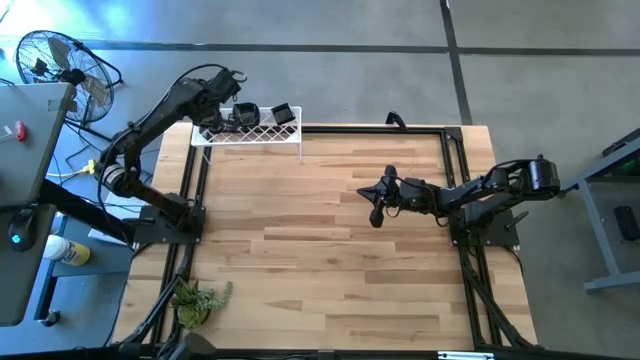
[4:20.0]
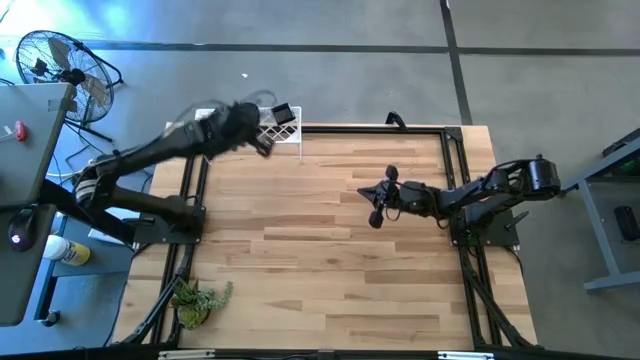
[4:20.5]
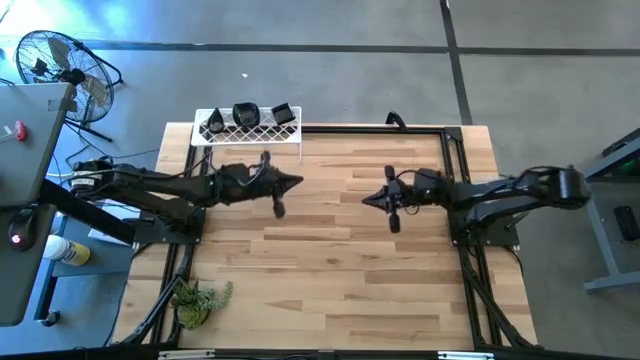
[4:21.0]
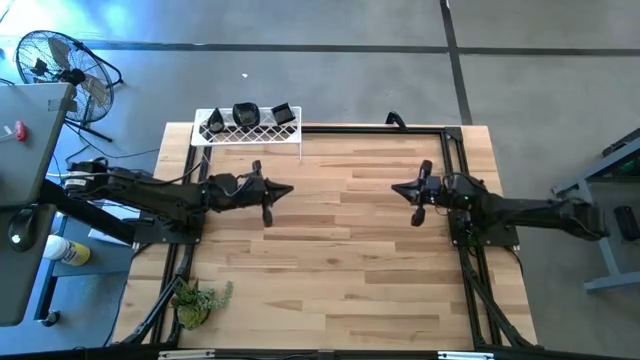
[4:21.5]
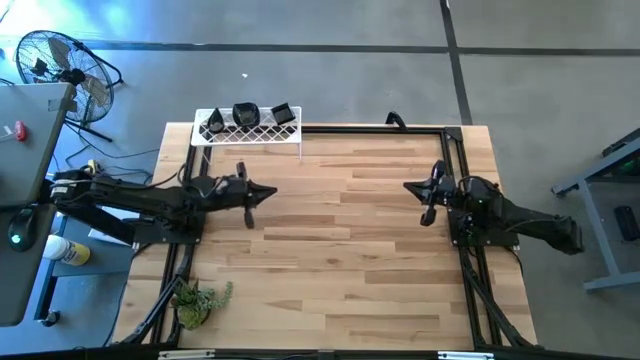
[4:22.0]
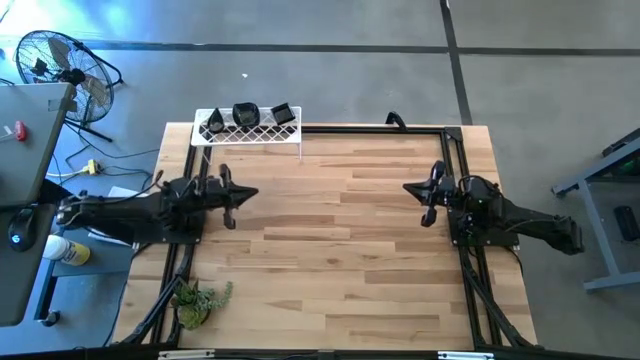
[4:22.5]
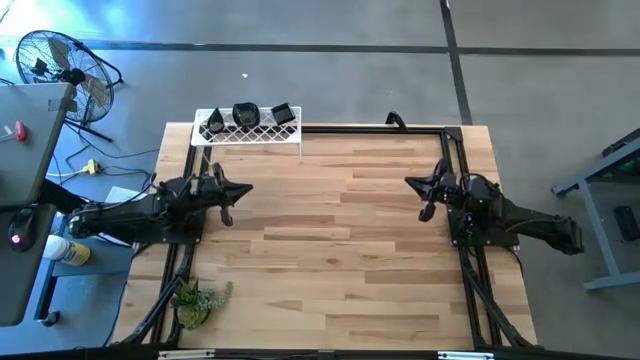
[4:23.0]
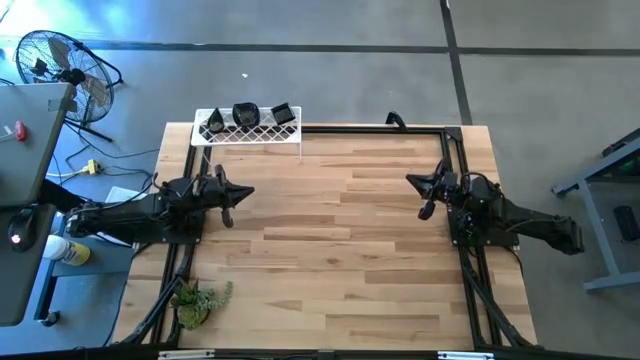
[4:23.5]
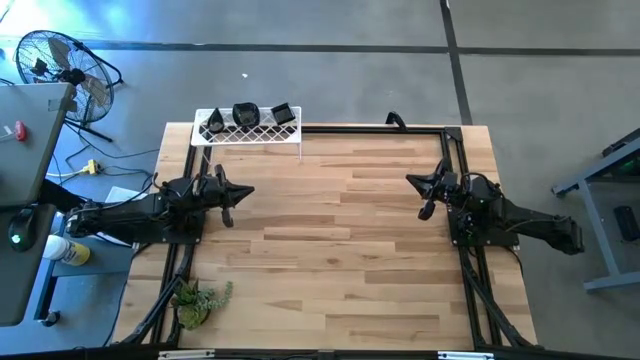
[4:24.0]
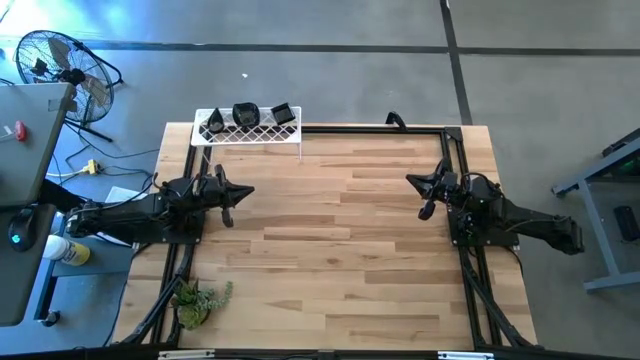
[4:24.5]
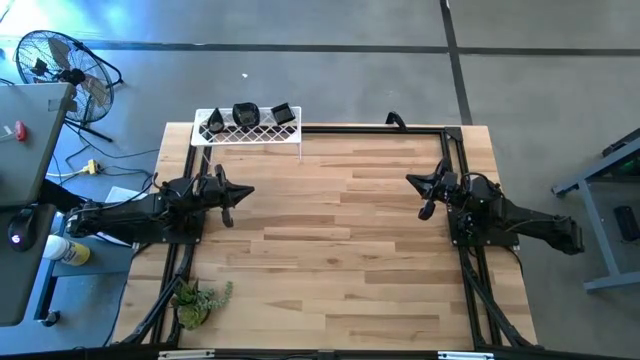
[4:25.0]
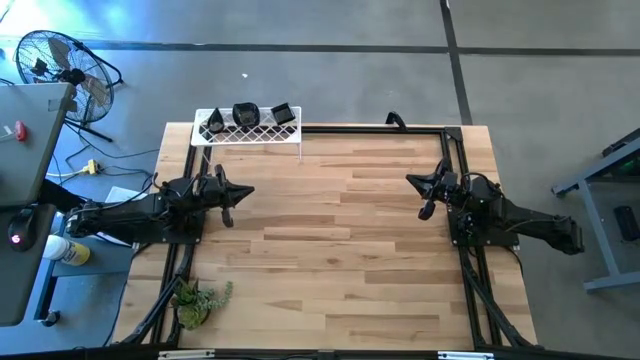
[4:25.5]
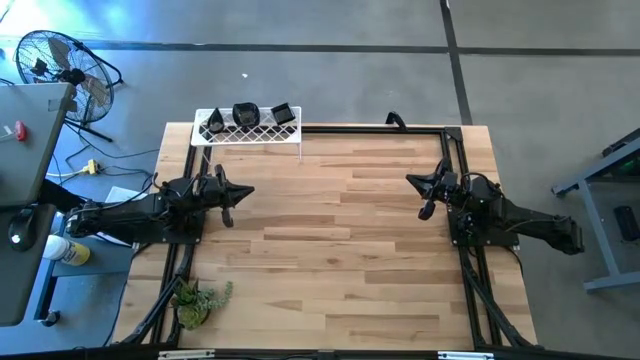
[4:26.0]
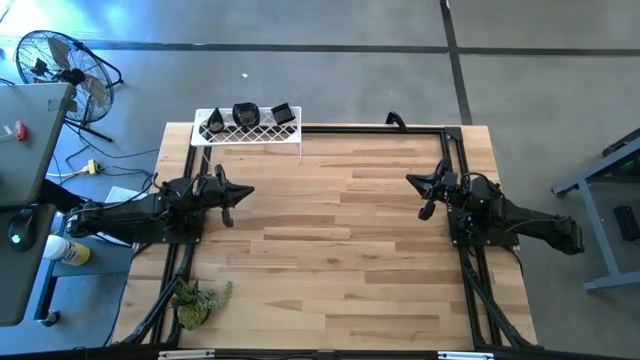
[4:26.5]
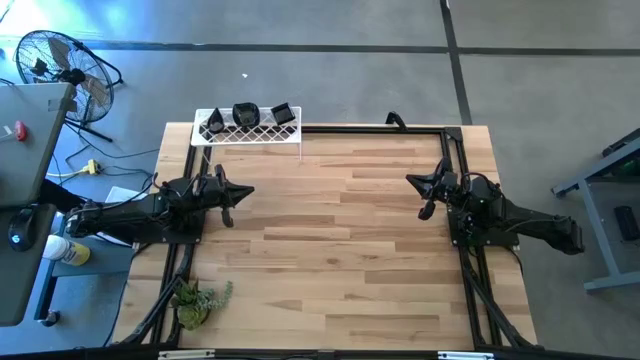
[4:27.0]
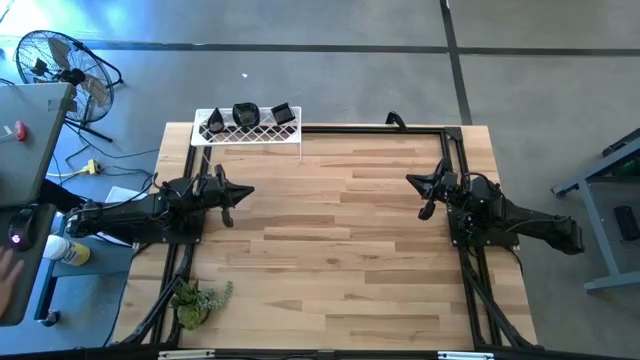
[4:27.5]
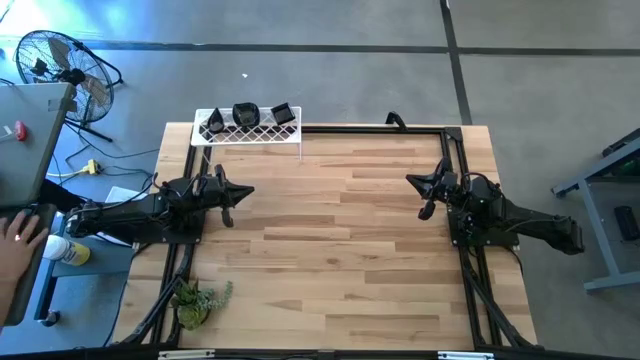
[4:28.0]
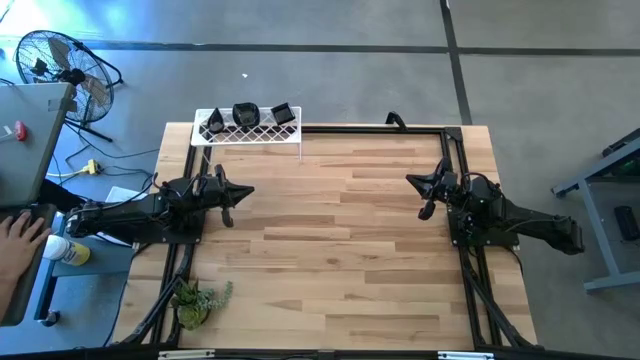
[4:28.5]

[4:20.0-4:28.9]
Task: Pick & Place Mini shaped plates
Return to Home Position

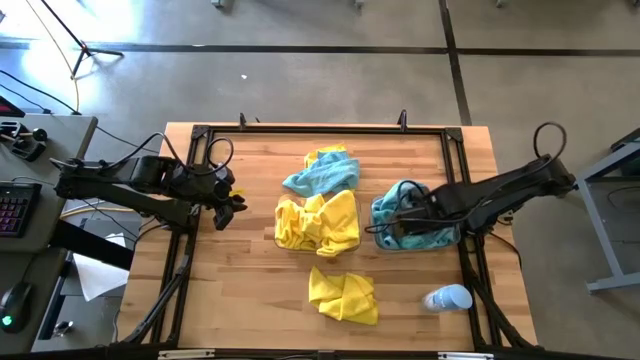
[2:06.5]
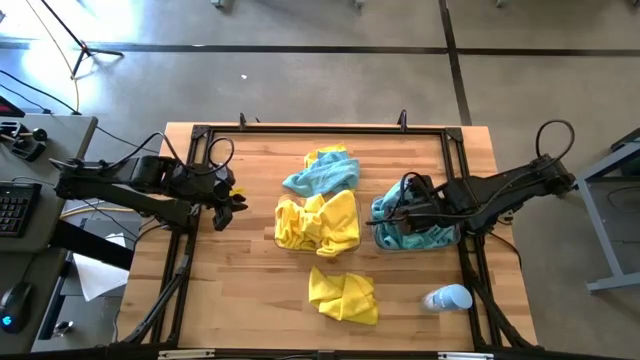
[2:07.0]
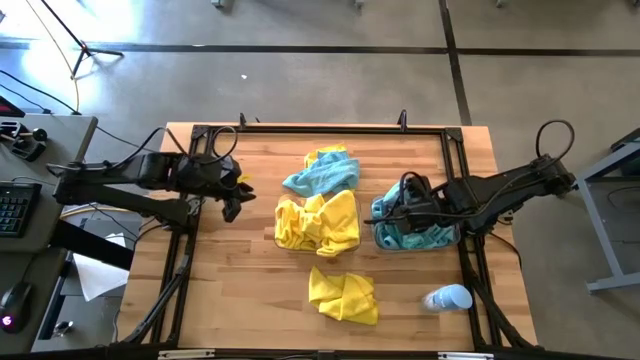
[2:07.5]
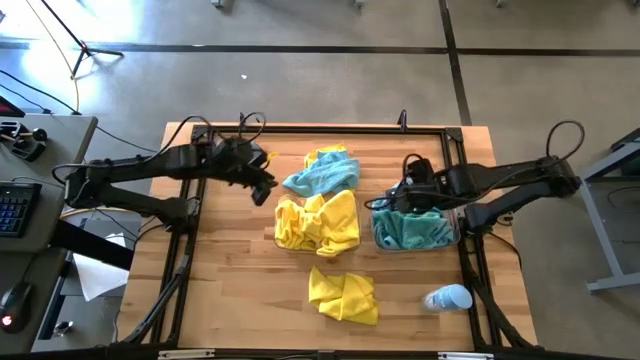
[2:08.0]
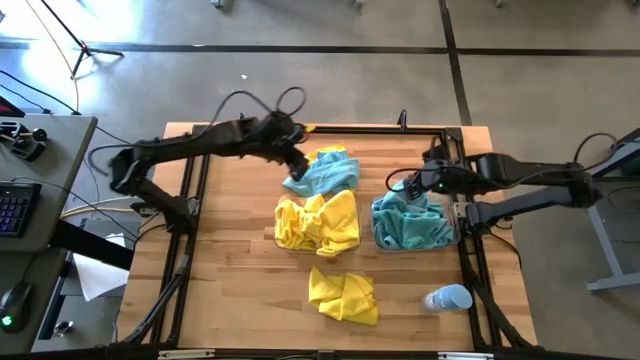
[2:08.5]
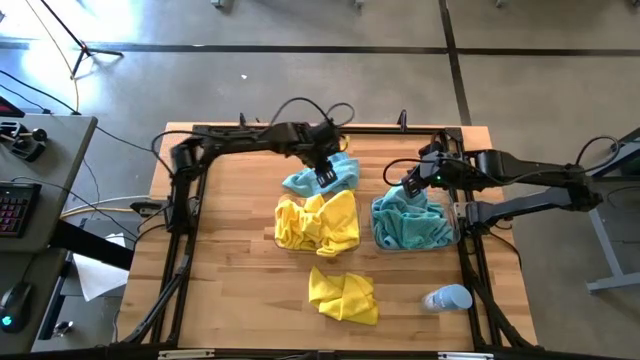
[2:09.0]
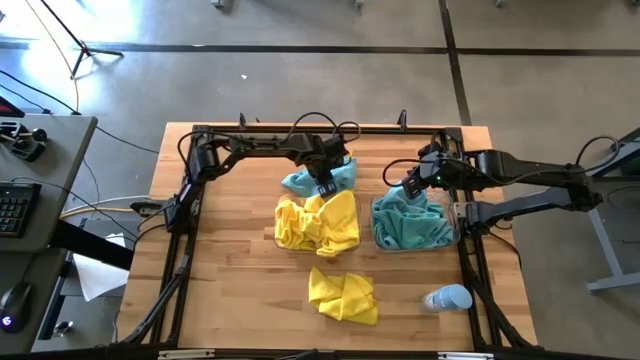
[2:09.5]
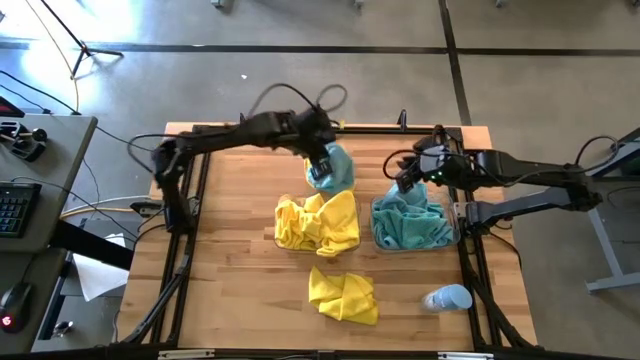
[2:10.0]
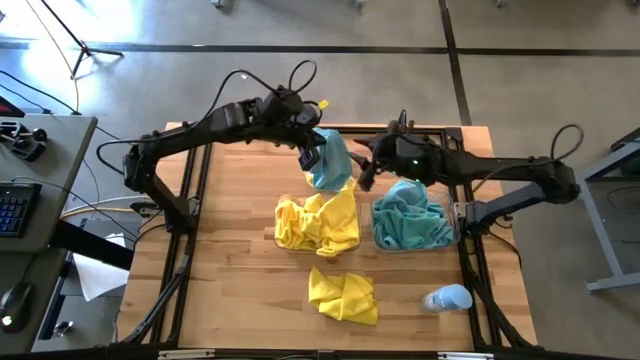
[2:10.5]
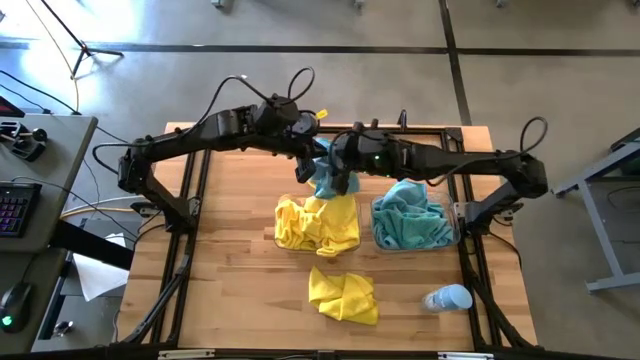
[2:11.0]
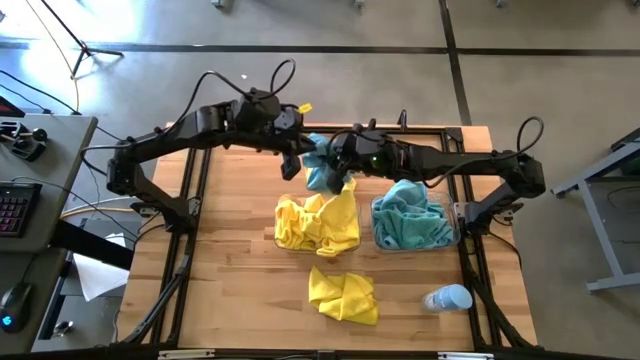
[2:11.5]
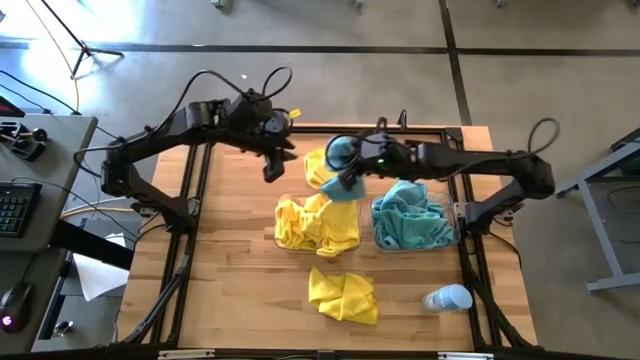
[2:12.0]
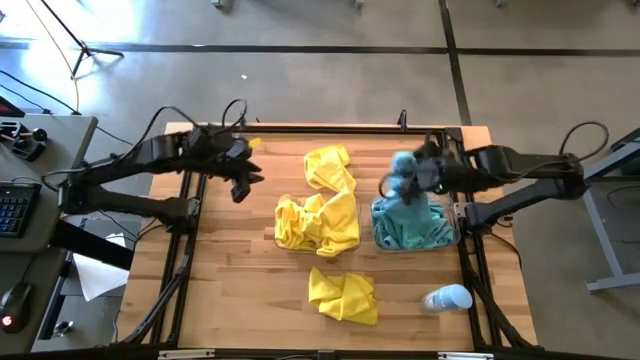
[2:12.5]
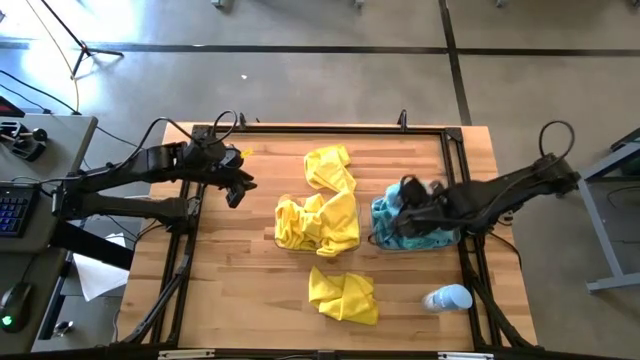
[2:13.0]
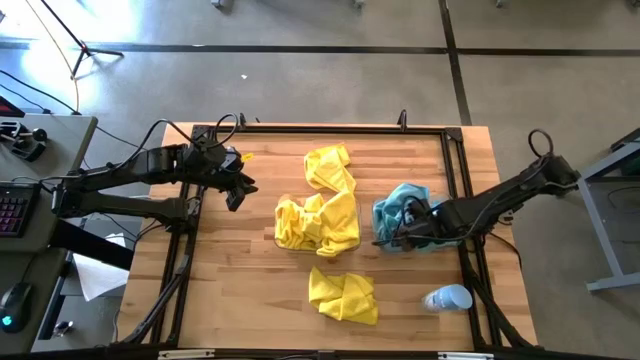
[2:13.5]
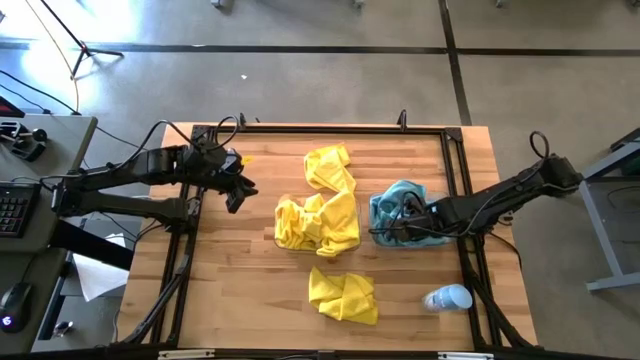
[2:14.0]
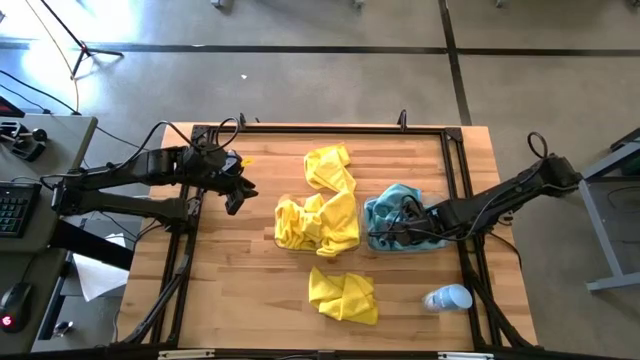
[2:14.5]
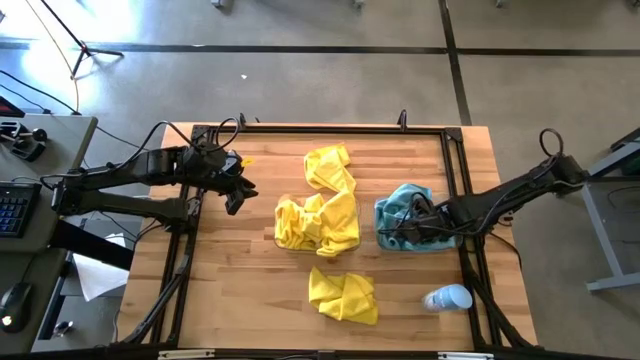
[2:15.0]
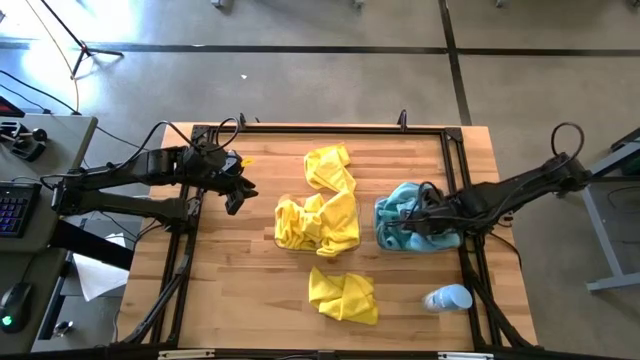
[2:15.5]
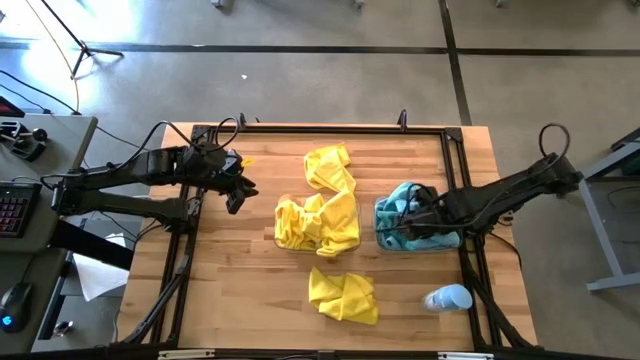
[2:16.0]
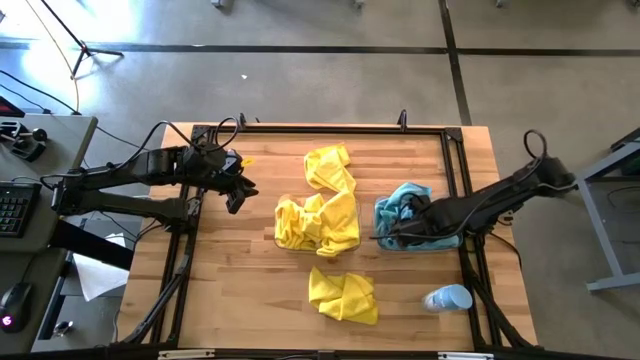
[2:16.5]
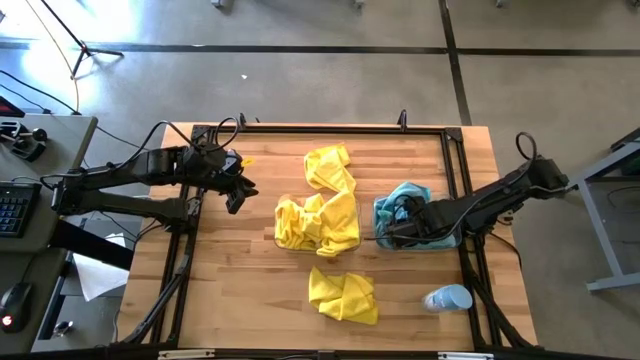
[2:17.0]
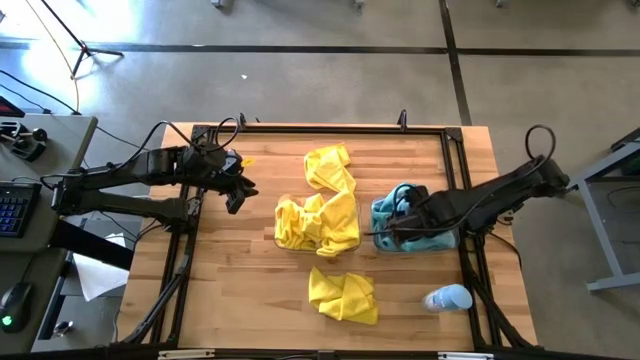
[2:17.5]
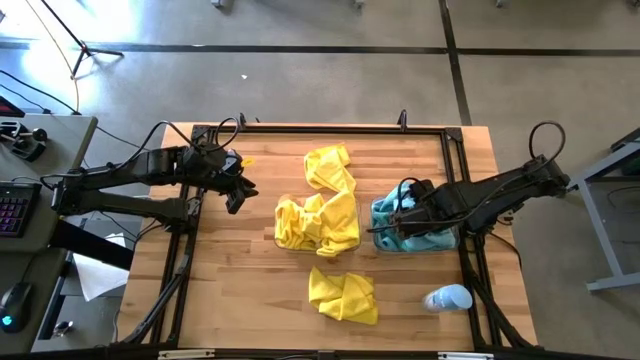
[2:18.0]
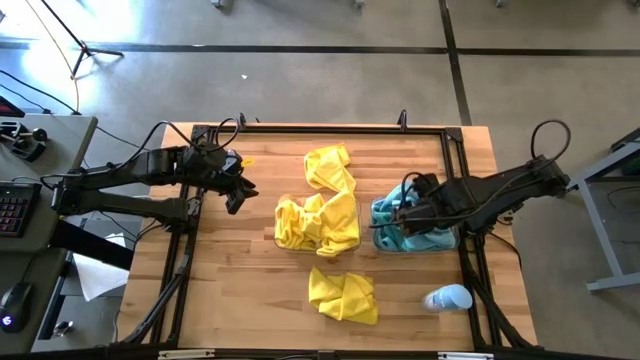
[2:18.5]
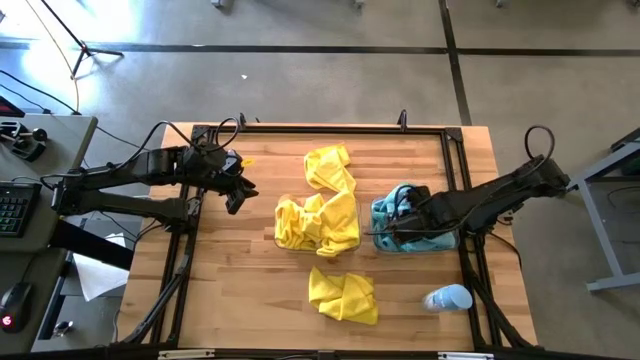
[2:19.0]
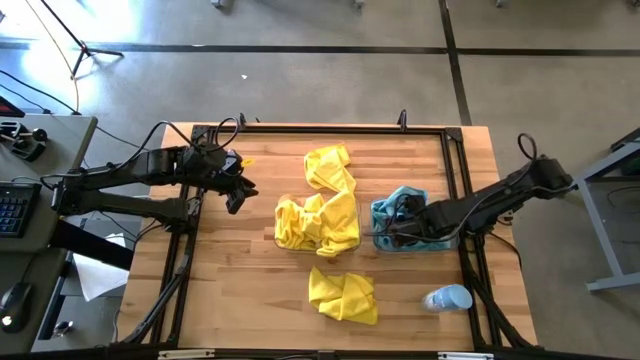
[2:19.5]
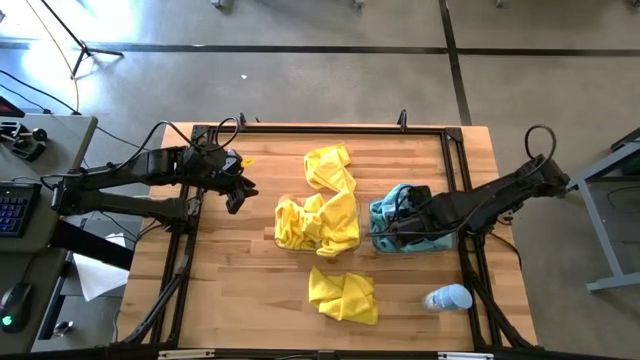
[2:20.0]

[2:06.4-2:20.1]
Task: Sort microfiber towel by color & place in baskets
Put the blue microfiber cloth into the right transparent bin
